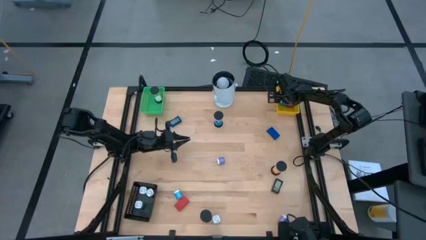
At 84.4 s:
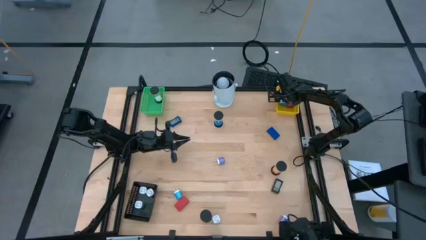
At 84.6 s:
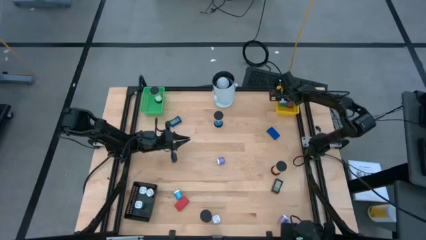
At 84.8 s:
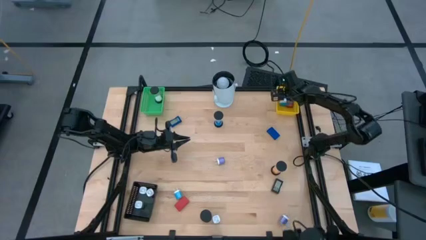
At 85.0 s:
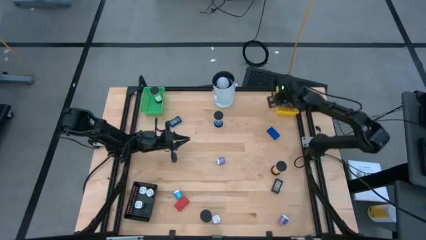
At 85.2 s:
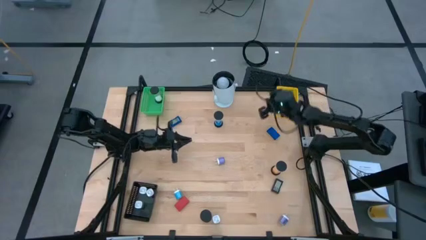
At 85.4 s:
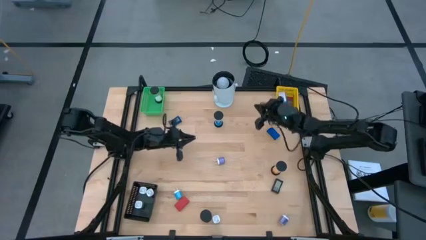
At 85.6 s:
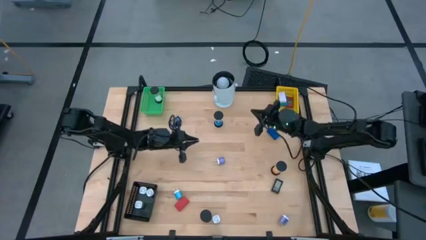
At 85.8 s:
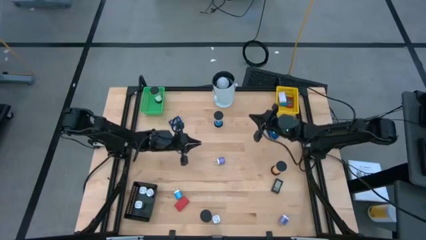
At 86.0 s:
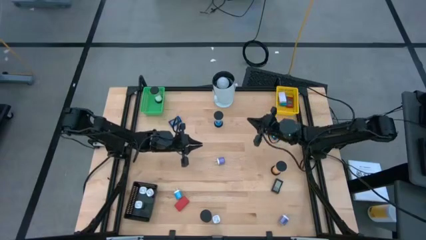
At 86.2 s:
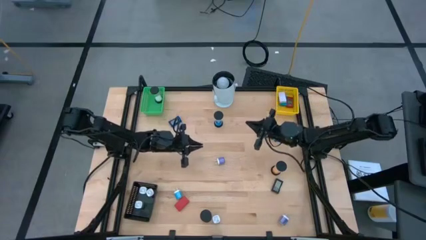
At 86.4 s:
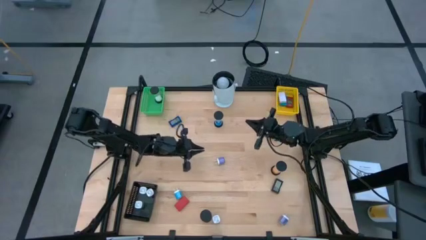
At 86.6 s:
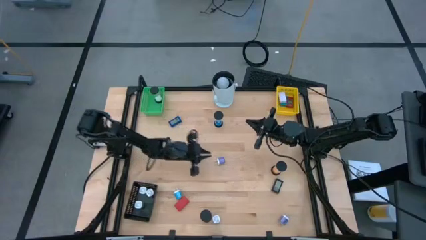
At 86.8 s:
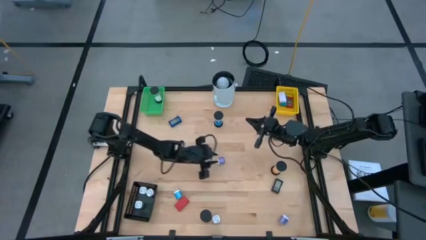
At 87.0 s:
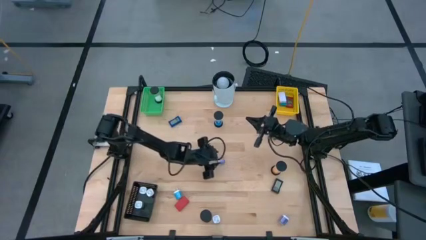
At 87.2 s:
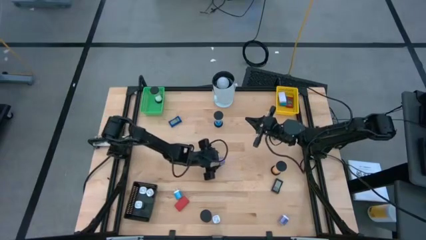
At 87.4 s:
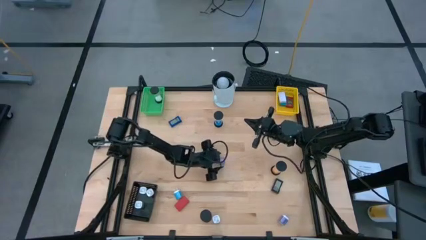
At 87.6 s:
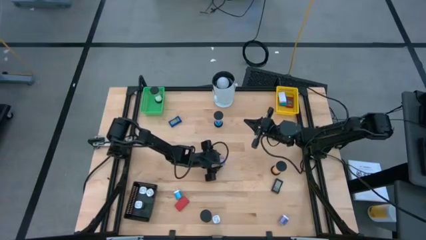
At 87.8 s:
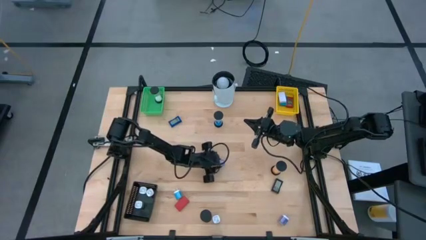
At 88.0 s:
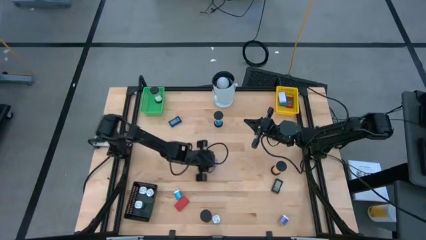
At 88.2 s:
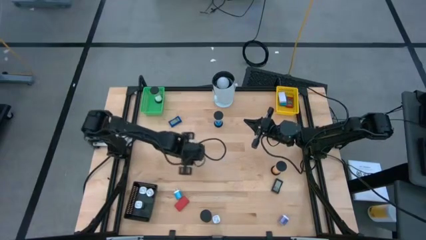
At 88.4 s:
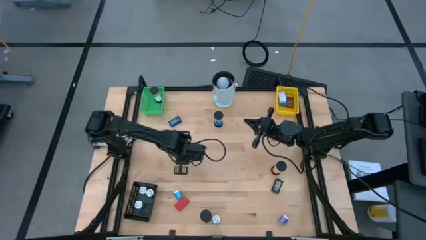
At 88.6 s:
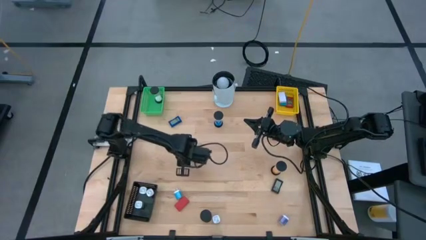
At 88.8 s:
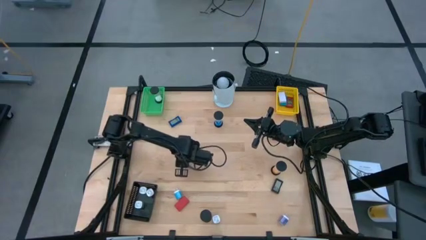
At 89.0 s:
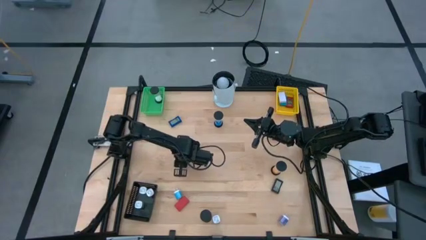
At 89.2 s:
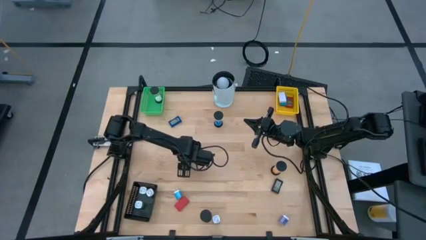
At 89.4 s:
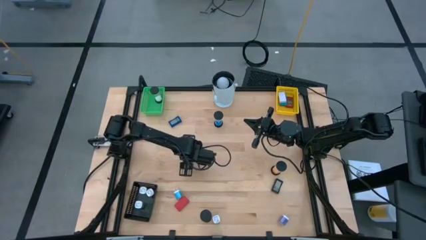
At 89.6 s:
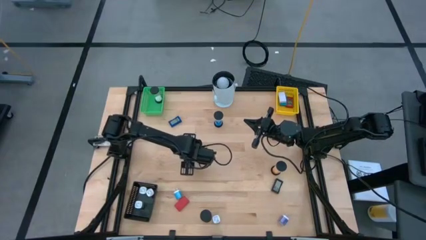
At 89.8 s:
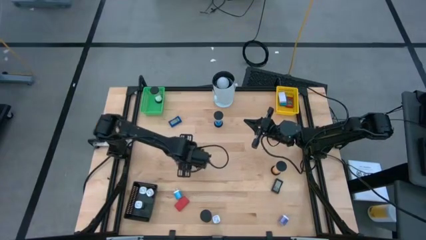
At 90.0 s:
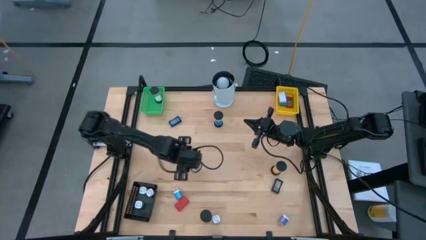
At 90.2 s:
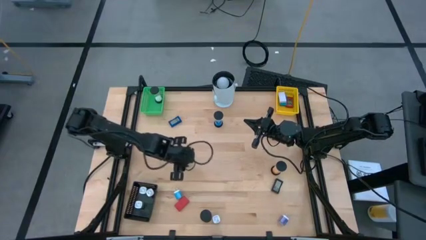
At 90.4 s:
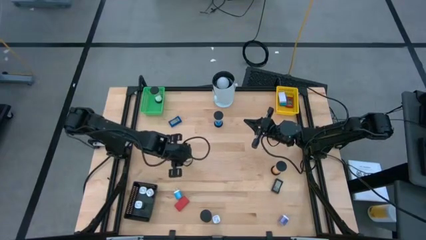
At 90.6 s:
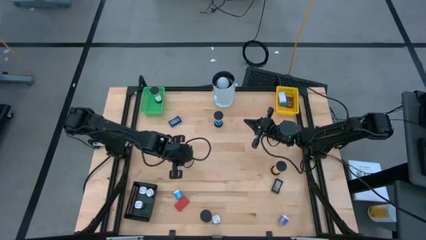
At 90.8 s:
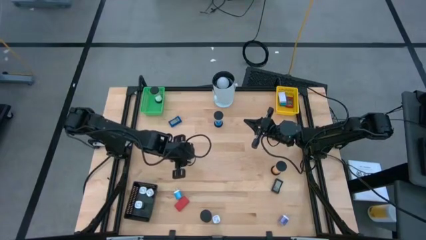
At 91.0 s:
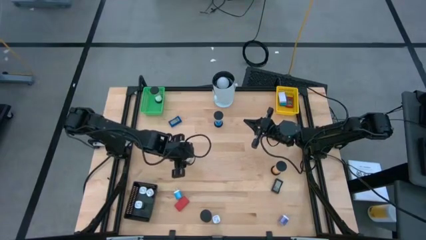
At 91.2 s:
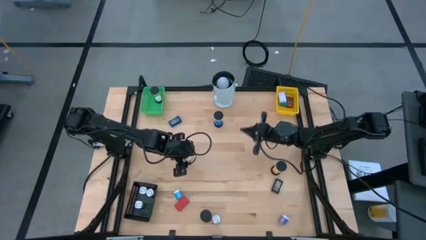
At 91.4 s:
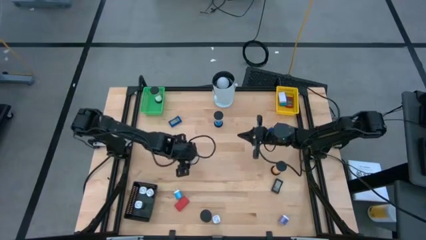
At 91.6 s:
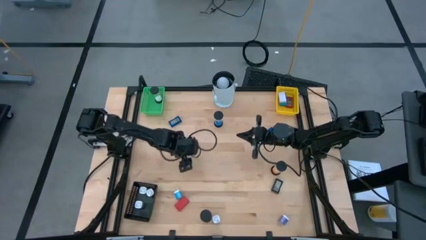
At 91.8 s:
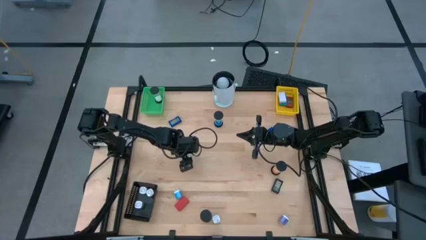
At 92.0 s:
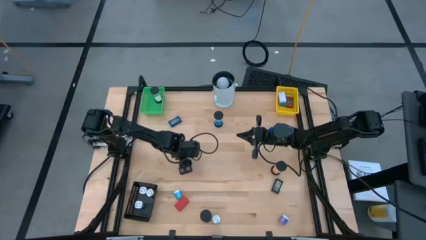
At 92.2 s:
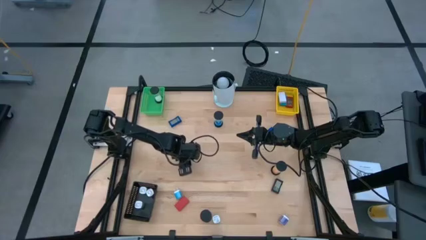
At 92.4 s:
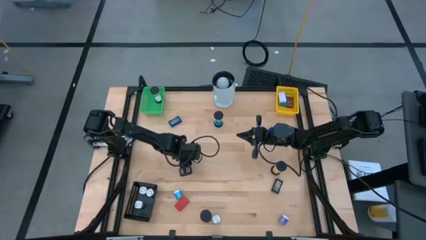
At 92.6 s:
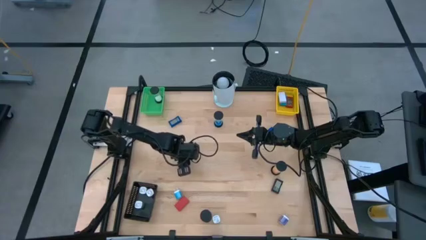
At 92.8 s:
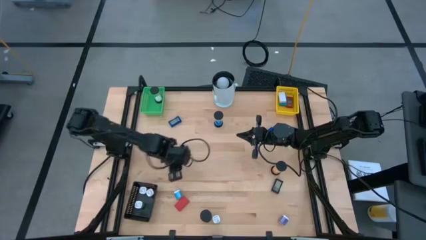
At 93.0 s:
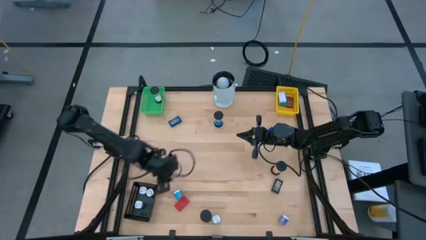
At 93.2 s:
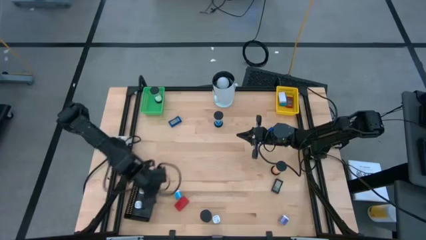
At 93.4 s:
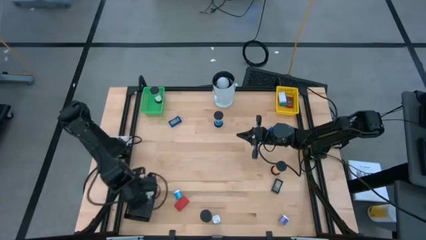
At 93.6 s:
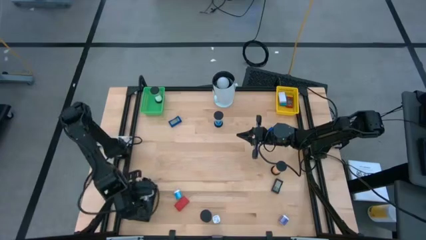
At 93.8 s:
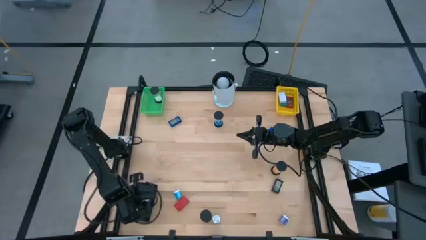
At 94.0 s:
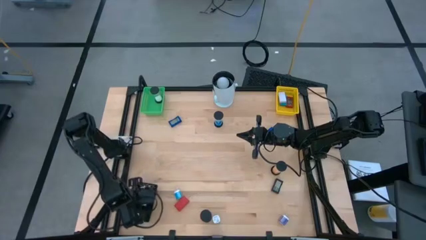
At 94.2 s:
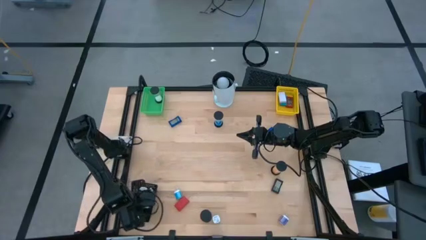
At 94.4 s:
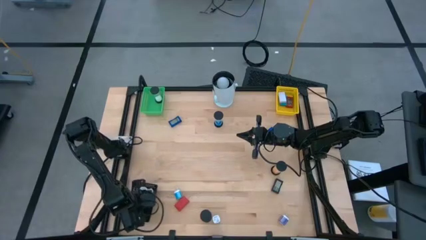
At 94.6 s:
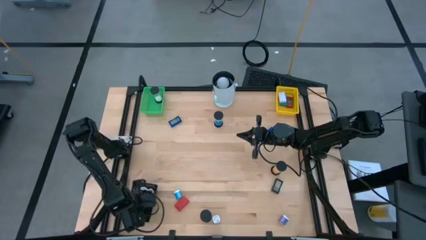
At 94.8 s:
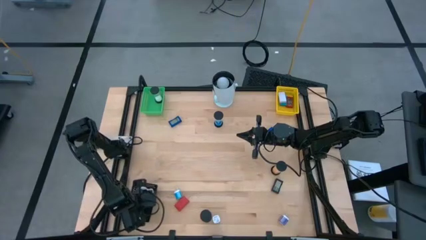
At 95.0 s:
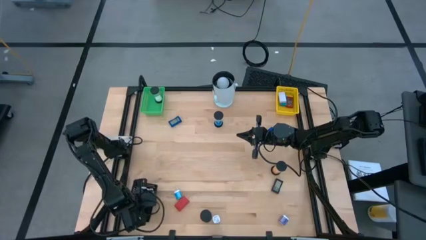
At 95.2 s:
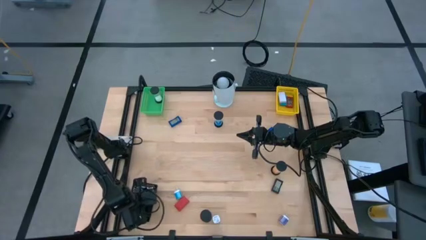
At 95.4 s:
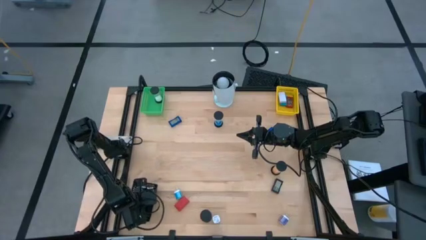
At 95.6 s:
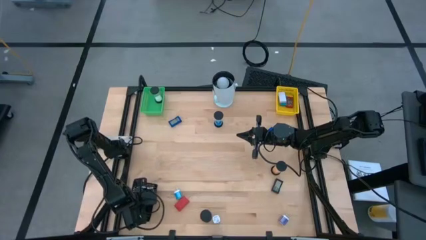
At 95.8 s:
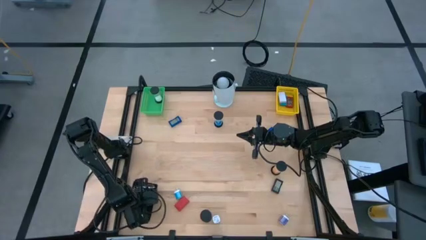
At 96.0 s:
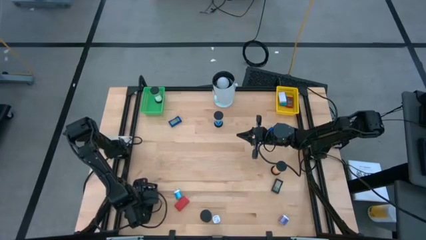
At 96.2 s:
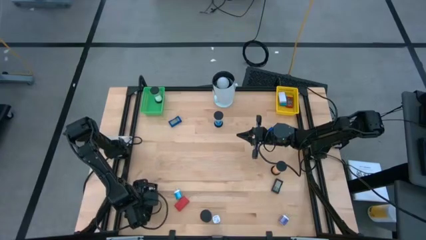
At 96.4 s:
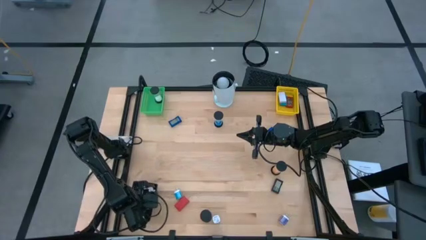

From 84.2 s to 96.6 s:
Task: Pick & Place Office items
Put the top purple charger adapter into the black bin

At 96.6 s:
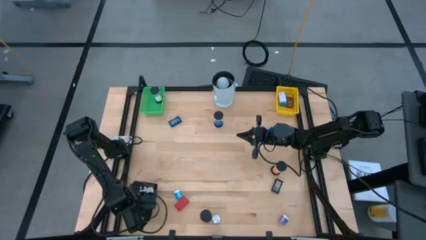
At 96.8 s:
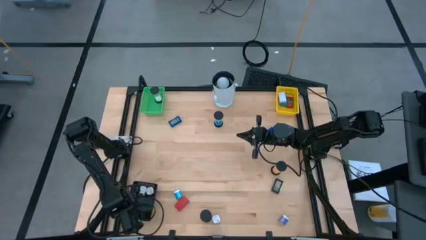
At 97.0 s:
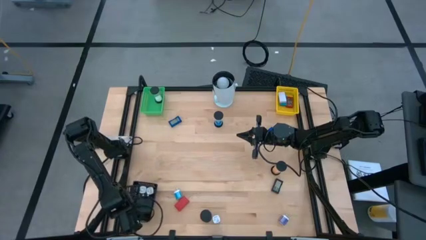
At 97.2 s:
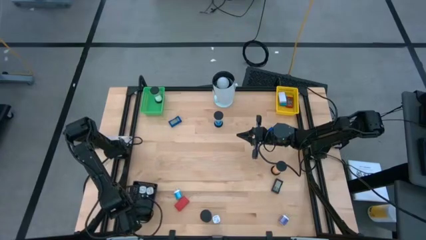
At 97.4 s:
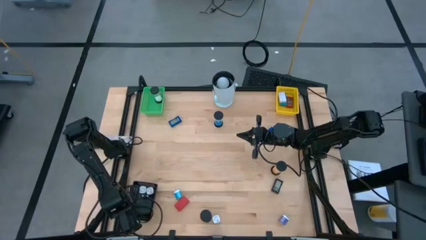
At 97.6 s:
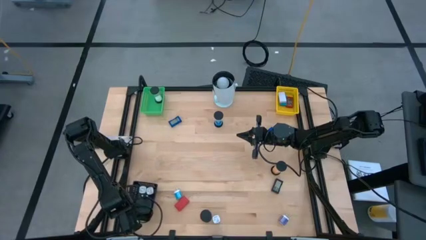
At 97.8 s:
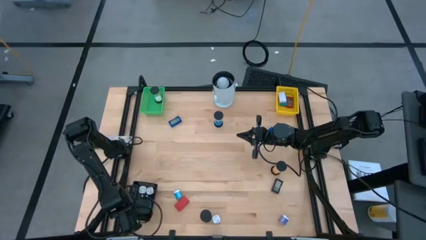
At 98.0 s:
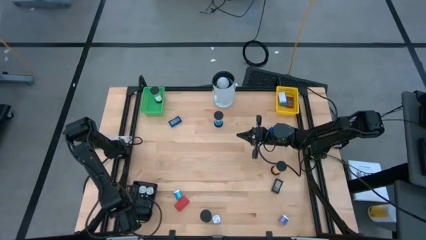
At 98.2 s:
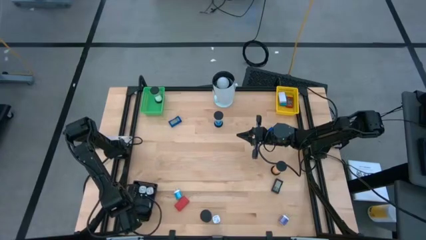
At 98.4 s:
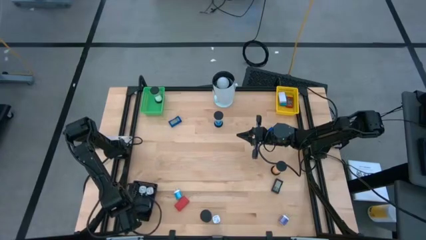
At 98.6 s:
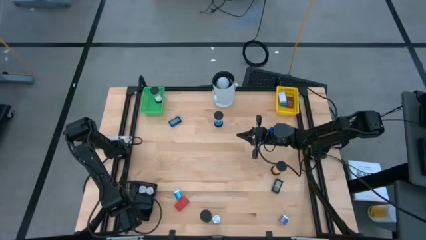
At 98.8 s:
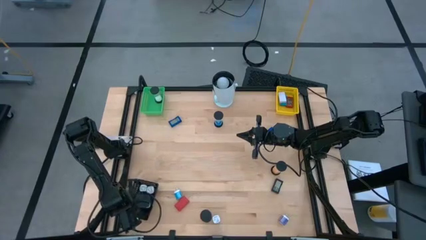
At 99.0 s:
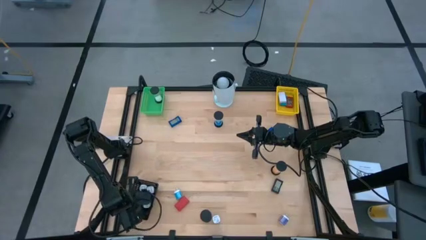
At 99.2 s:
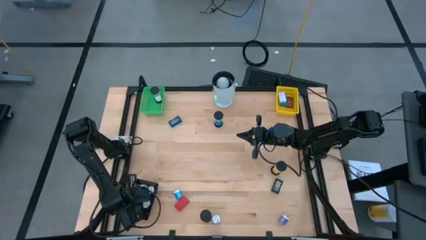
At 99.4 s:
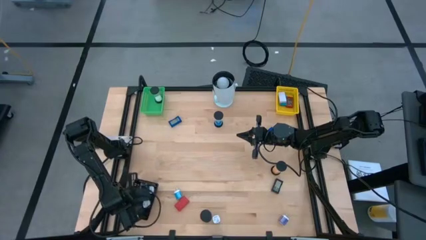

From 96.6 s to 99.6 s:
Adjust the green charger adapter
